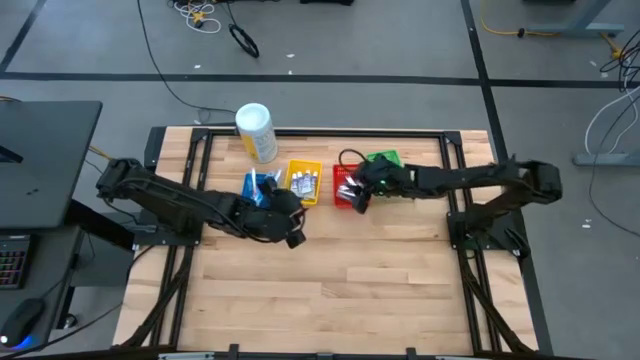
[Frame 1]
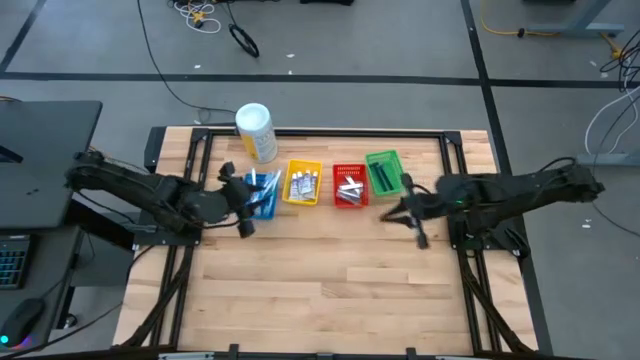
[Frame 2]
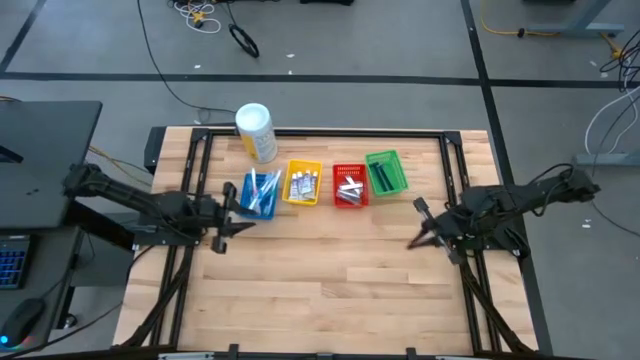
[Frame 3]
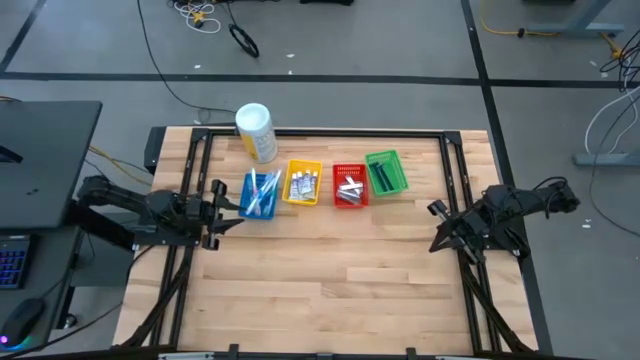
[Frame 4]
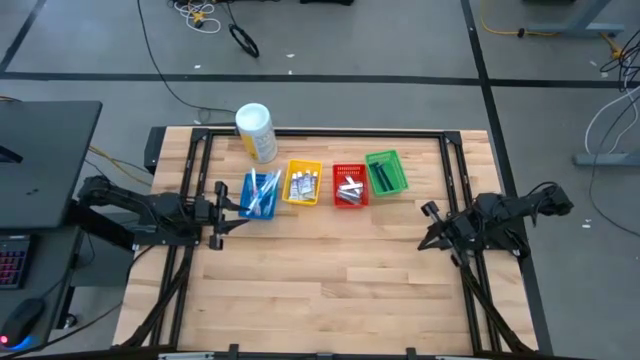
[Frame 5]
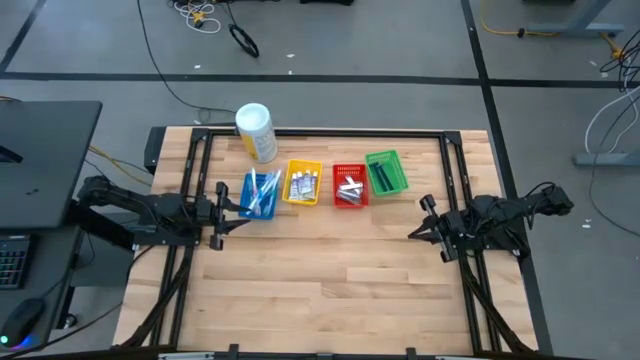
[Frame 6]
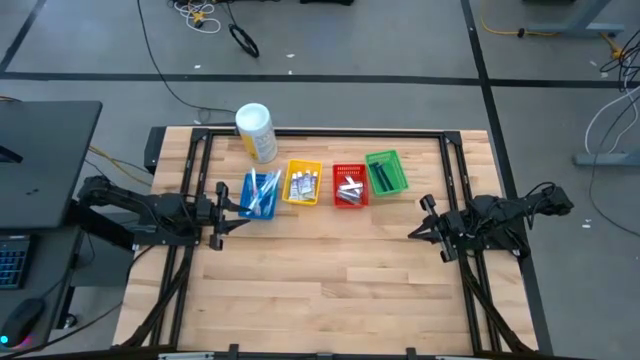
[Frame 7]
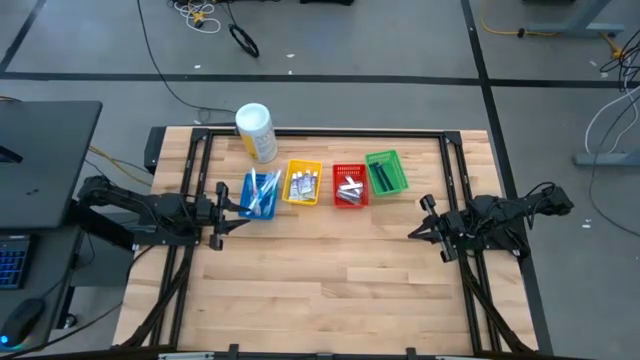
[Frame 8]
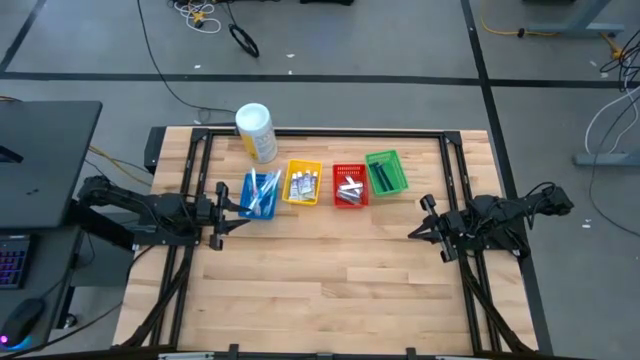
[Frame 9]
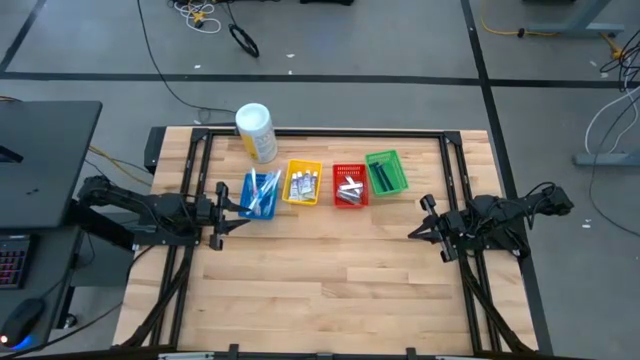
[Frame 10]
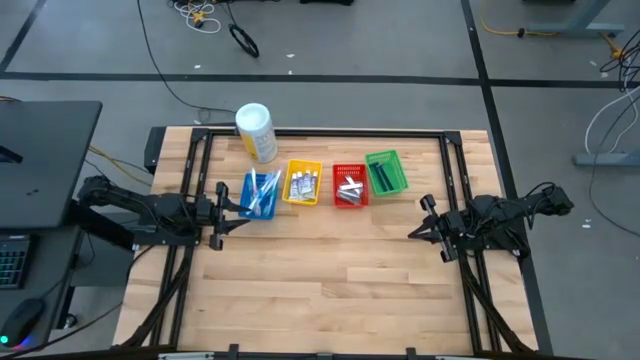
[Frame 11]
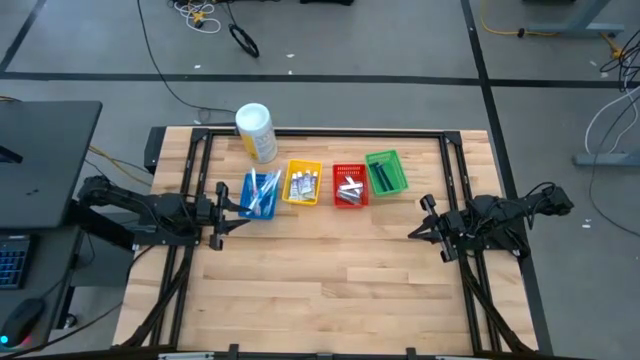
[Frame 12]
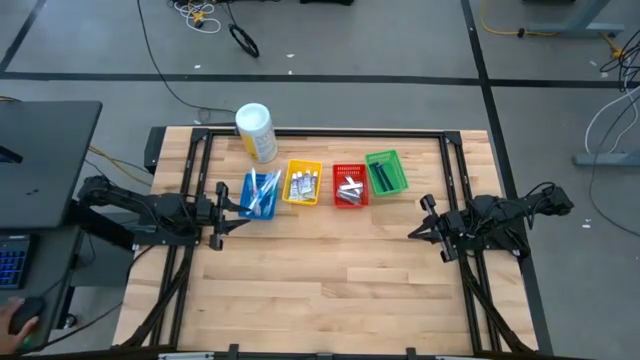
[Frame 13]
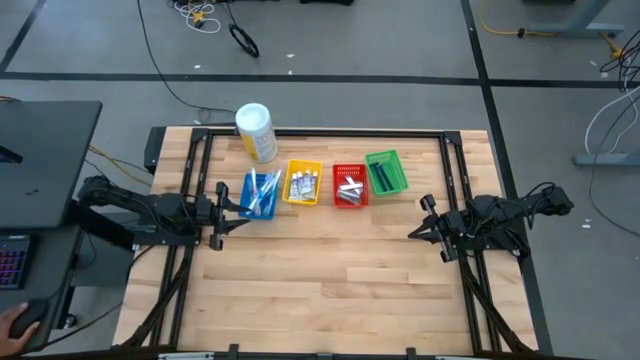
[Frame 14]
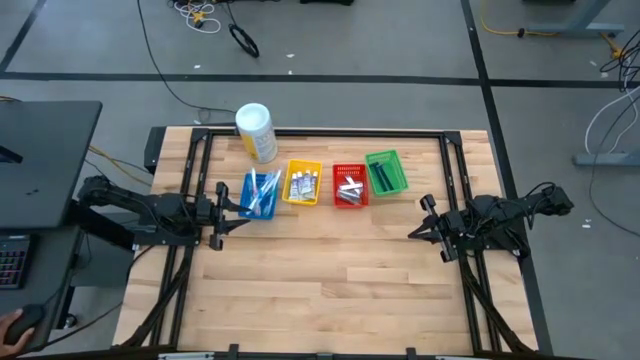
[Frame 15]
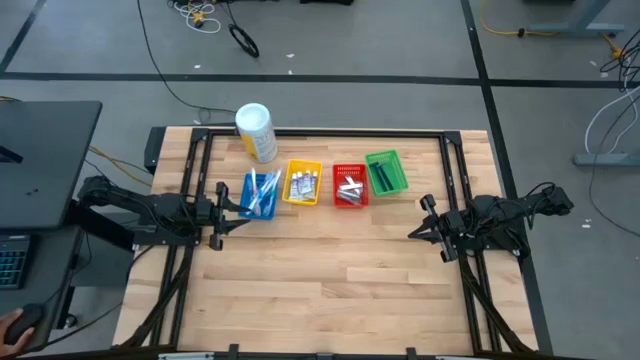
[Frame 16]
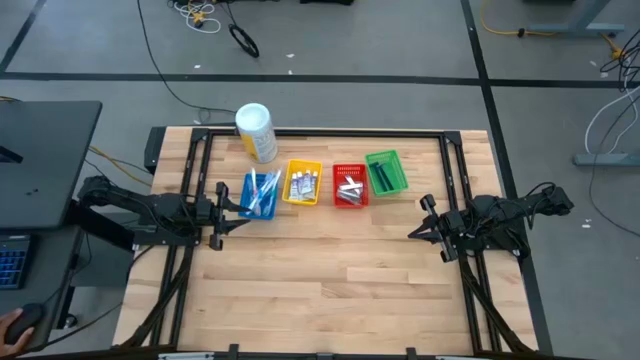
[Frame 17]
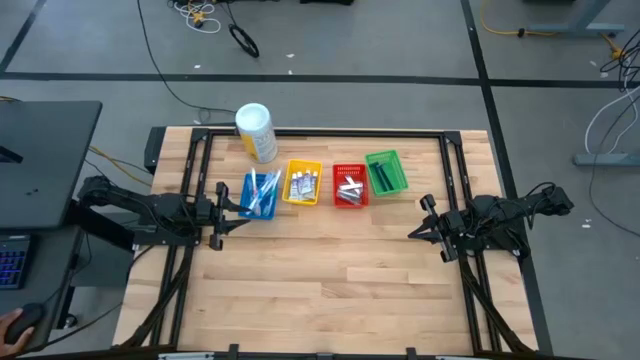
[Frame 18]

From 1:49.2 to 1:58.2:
Task: Pick & Place Travel size toiletries
Return to Home Position

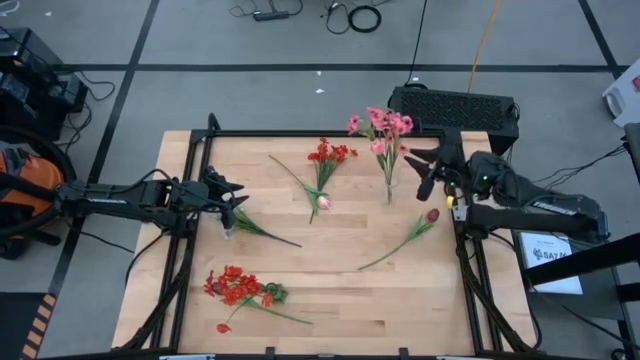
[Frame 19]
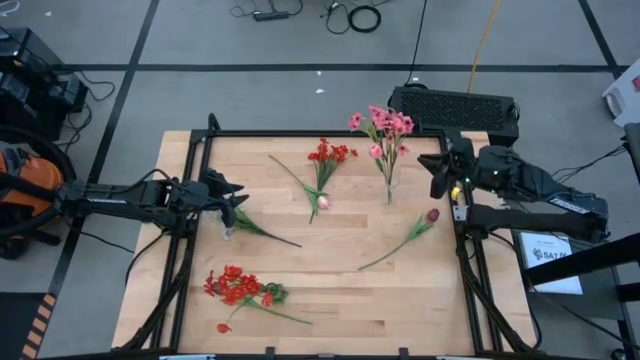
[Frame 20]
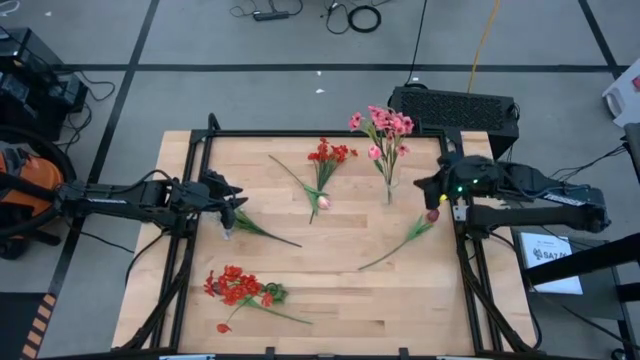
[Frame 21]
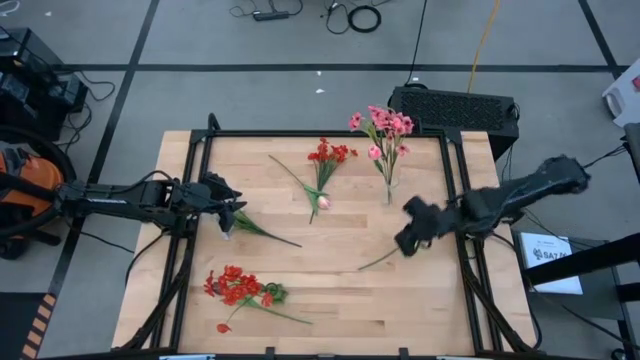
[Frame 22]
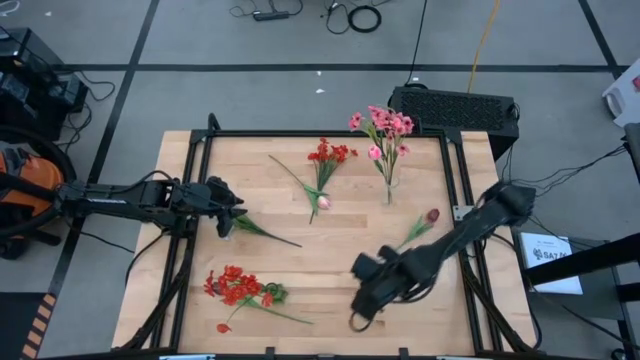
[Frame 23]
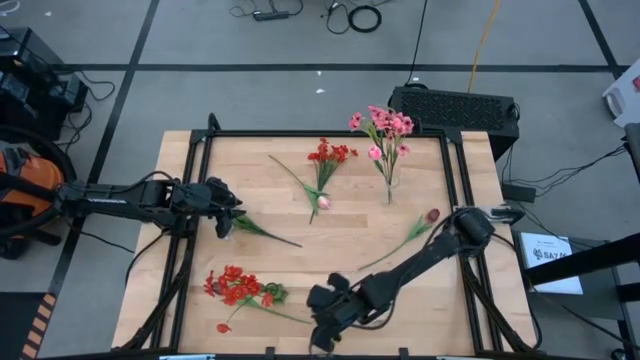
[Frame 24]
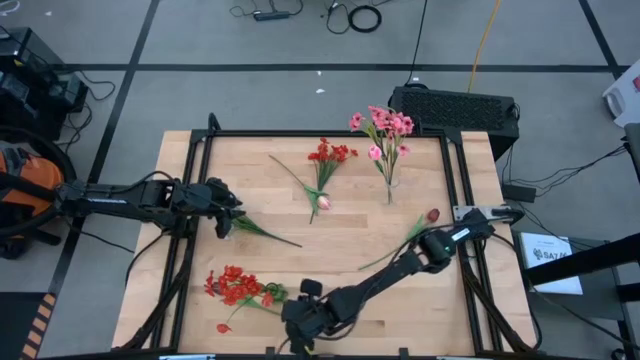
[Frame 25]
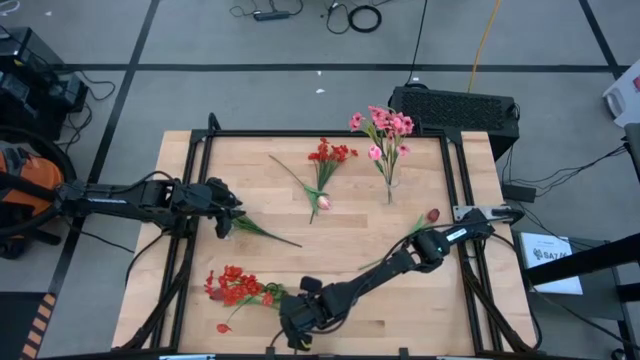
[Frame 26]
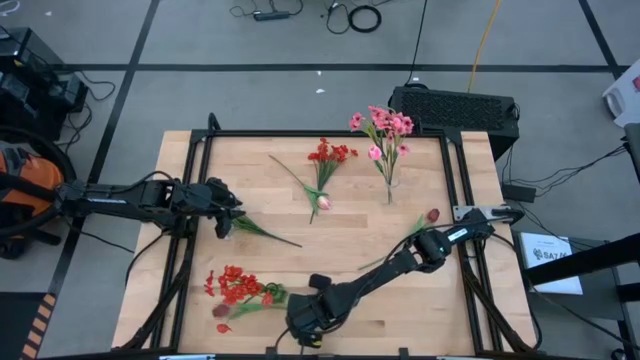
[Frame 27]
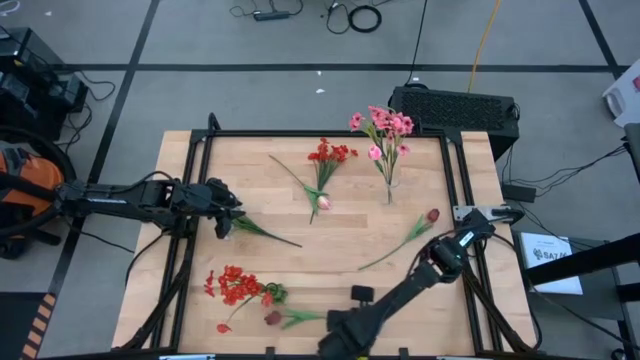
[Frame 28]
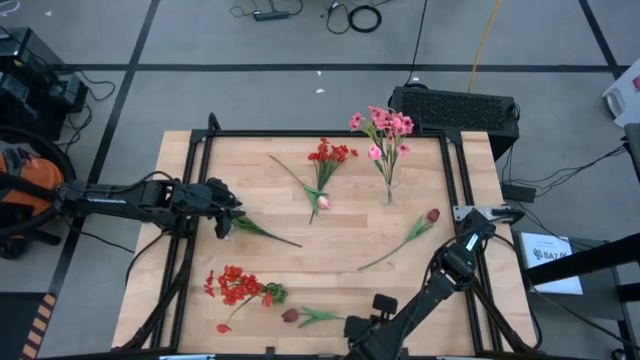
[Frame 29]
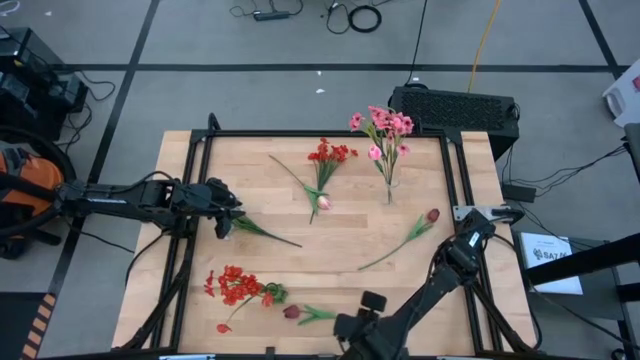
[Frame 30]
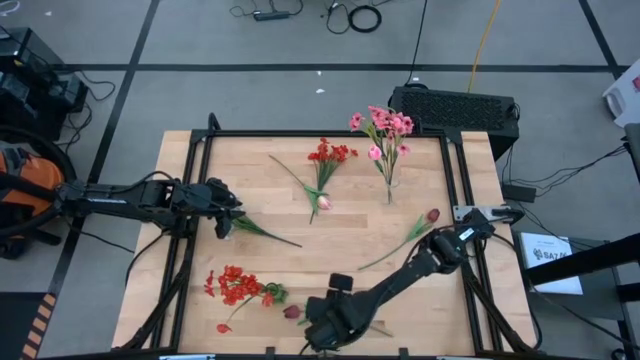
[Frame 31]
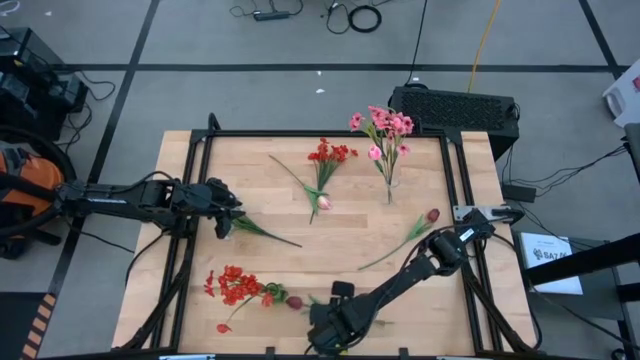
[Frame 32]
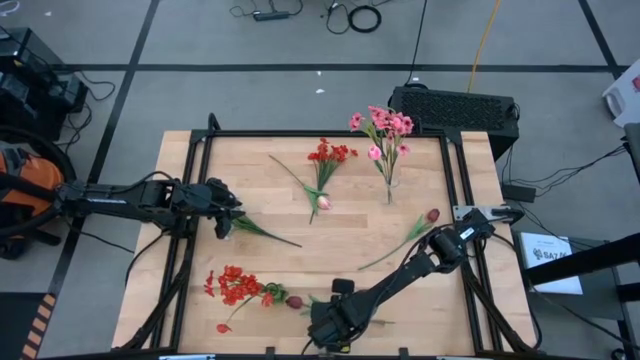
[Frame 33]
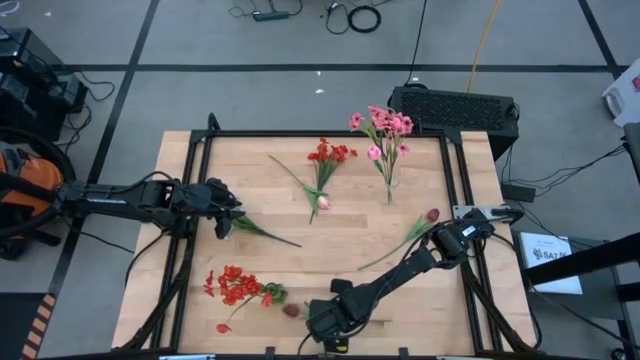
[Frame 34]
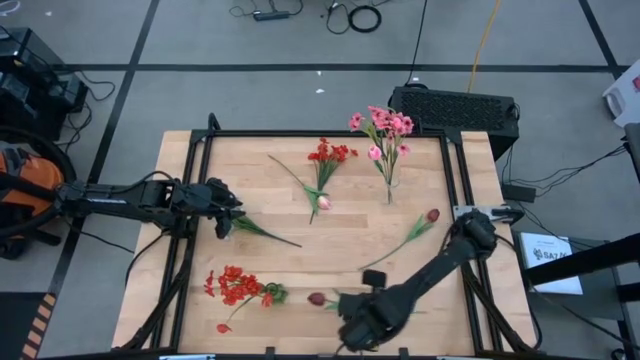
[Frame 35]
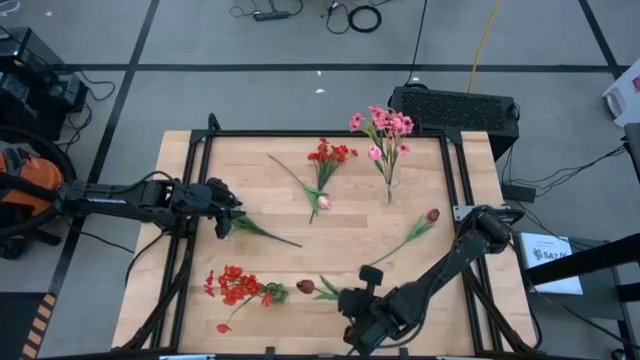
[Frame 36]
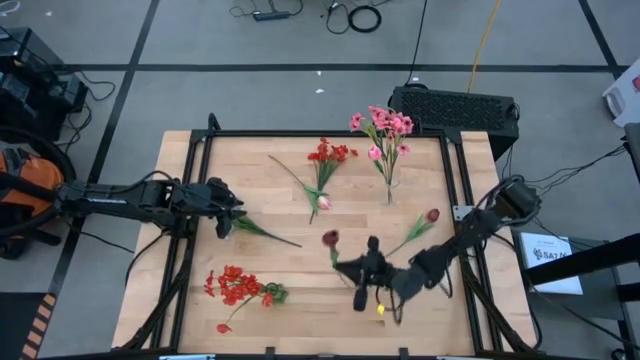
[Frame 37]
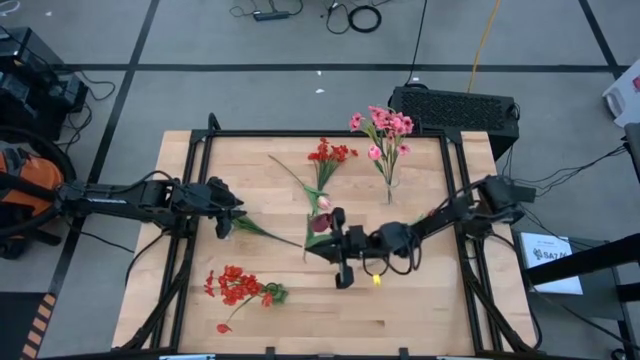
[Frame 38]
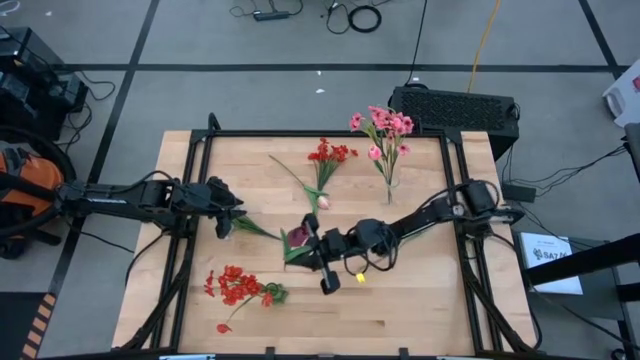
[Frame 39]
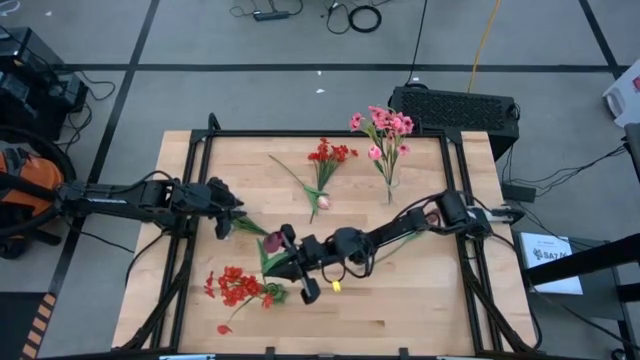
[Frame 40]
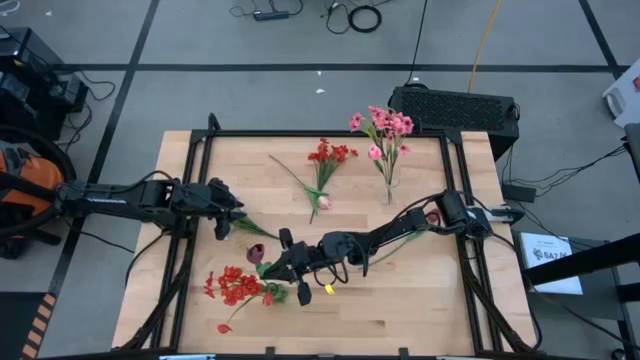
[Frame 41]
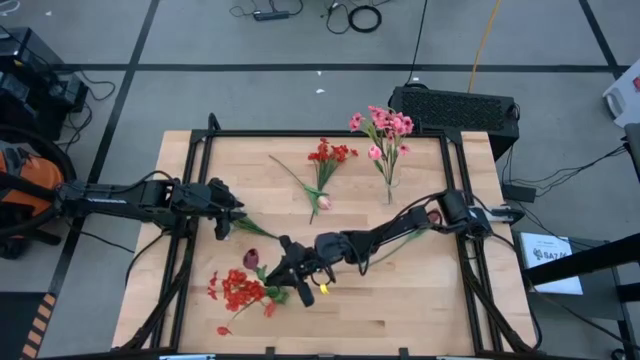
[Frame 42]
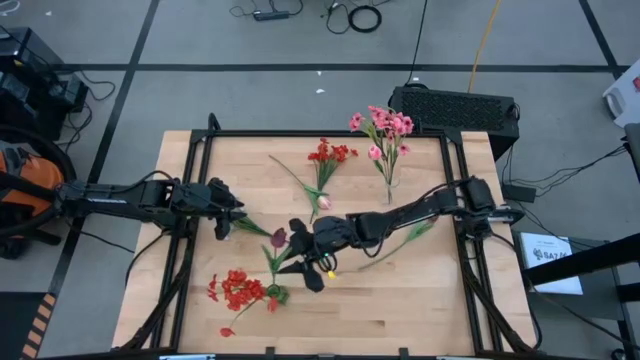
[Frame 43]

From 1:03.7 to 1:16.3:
Task: Sort flowers into vase by color
Put the bottom dark red flower into the green vase

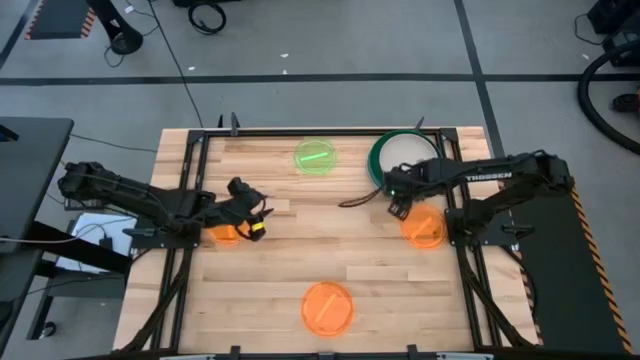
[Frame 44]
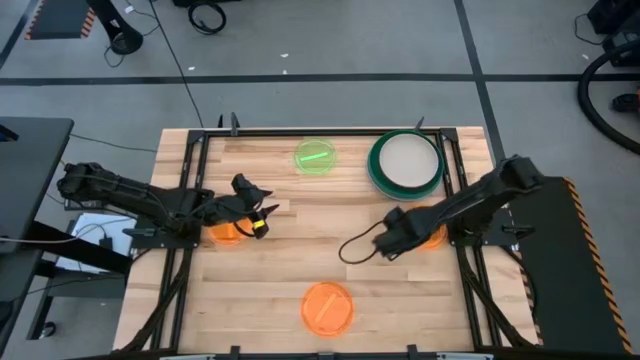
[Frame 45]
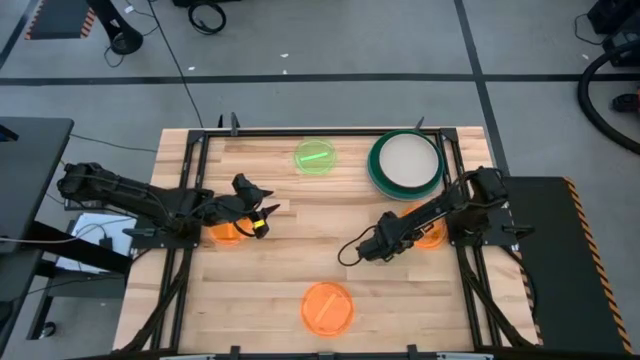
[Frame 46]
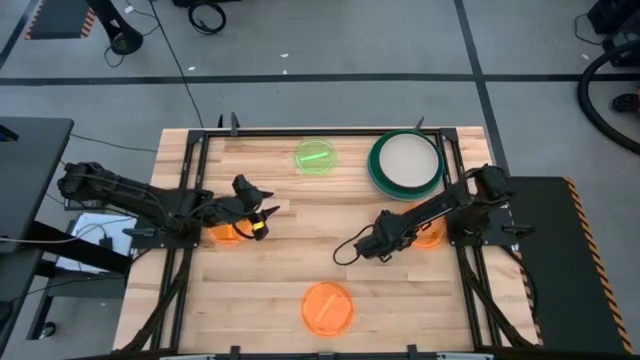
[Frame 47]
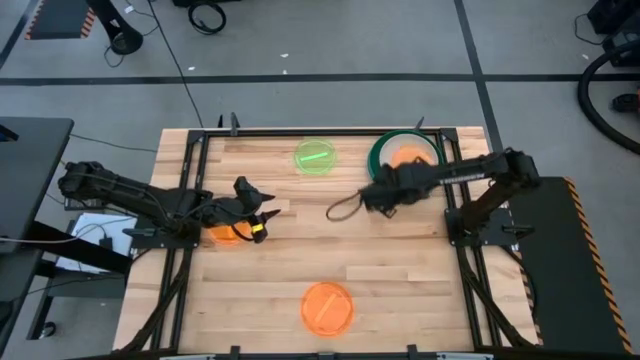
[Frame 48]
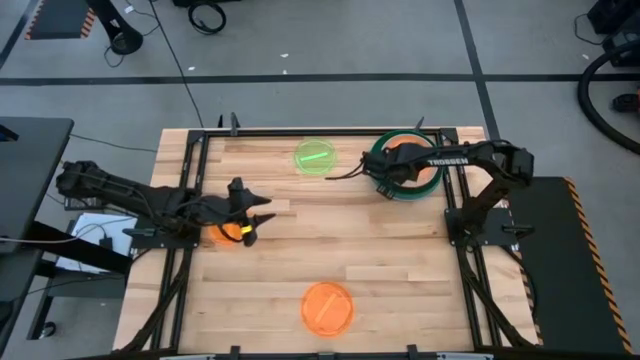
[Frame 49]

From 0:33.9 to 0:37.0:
Task: Stack plastic plates
Stack the top right light orange plate on top of the gray plate
